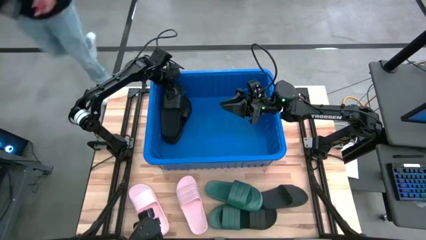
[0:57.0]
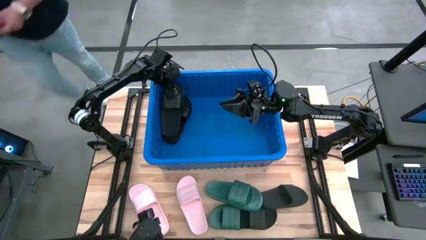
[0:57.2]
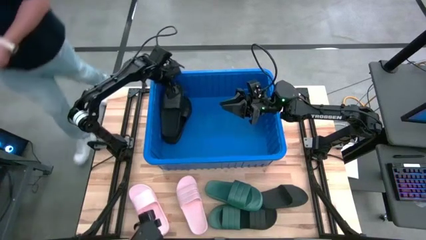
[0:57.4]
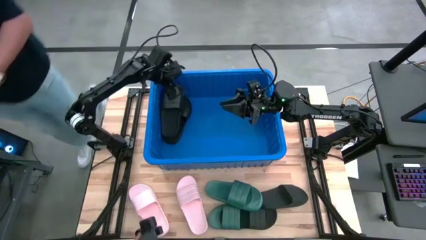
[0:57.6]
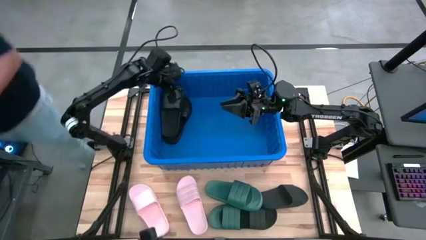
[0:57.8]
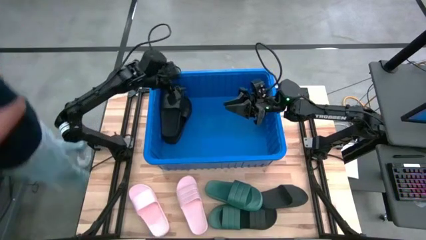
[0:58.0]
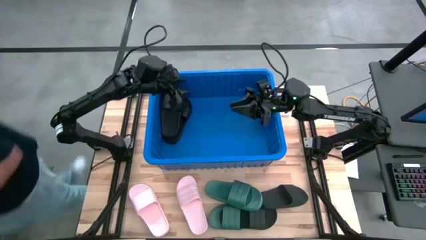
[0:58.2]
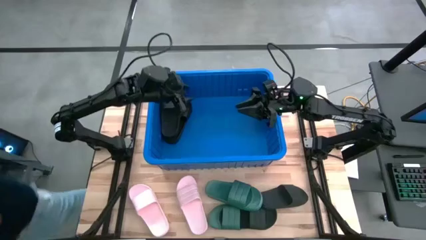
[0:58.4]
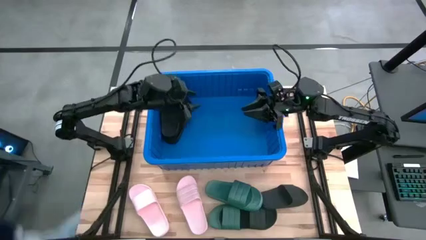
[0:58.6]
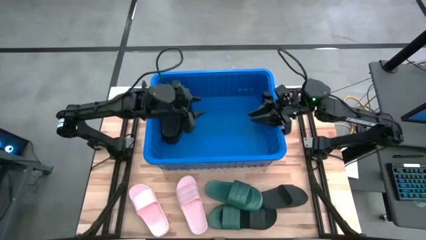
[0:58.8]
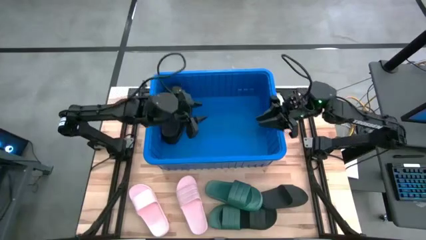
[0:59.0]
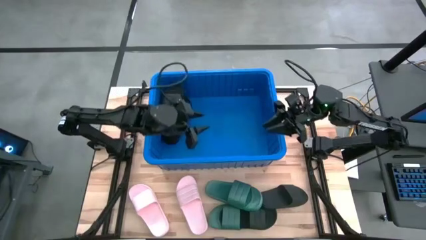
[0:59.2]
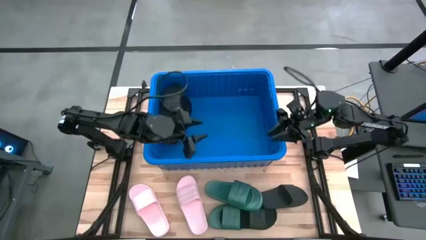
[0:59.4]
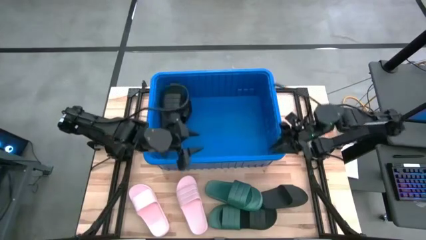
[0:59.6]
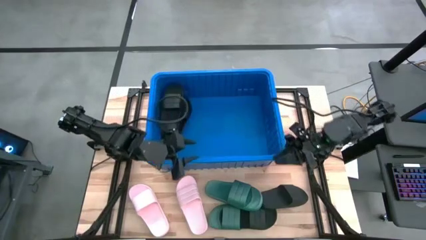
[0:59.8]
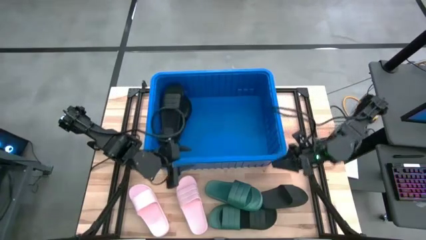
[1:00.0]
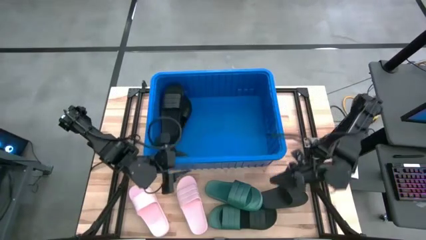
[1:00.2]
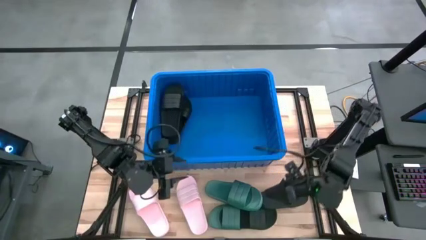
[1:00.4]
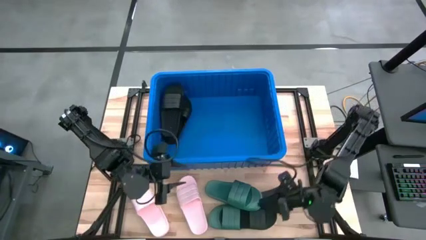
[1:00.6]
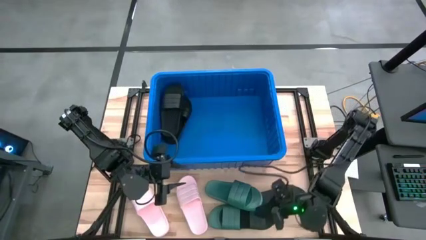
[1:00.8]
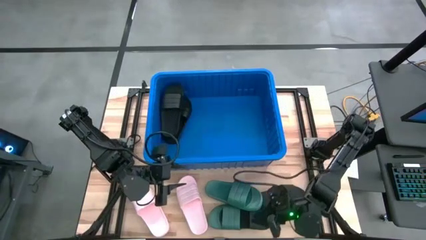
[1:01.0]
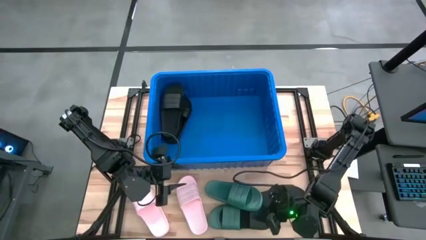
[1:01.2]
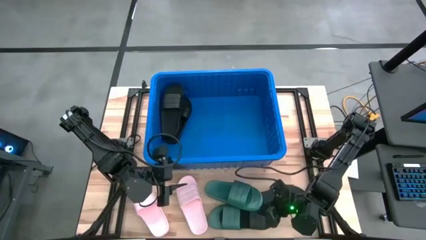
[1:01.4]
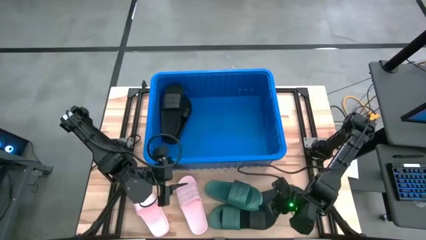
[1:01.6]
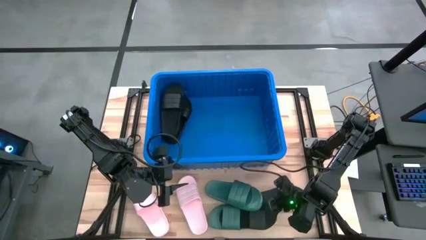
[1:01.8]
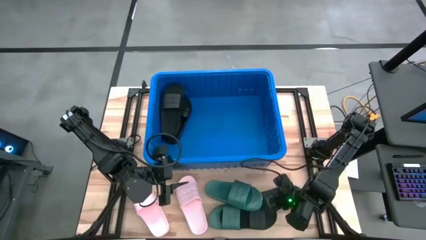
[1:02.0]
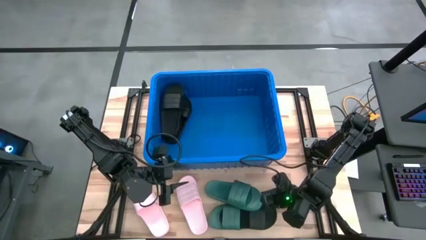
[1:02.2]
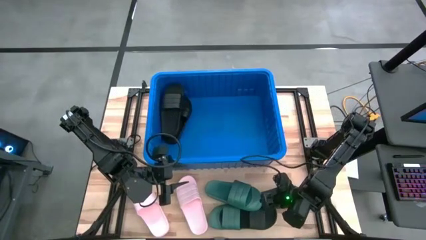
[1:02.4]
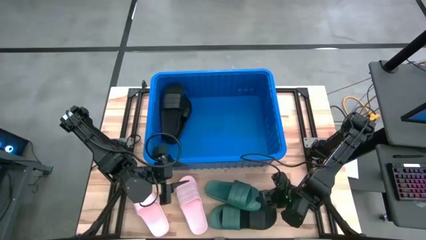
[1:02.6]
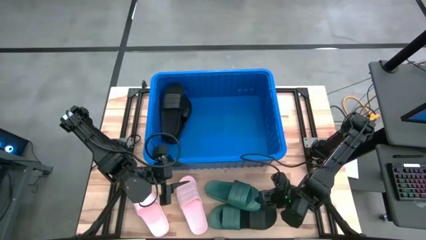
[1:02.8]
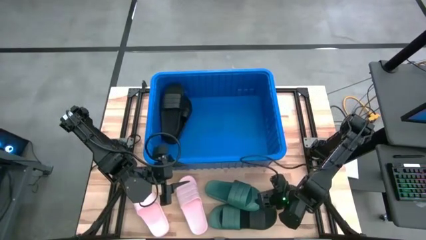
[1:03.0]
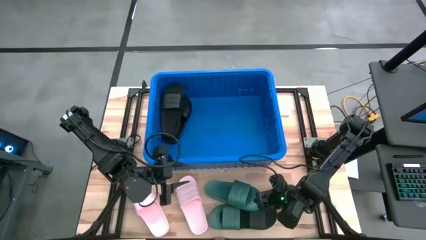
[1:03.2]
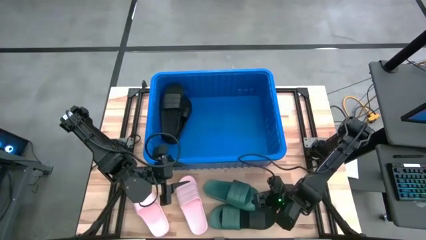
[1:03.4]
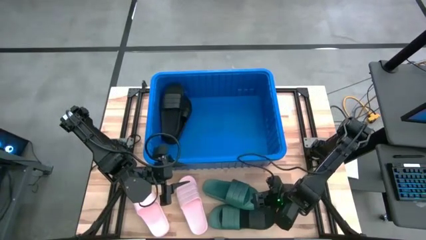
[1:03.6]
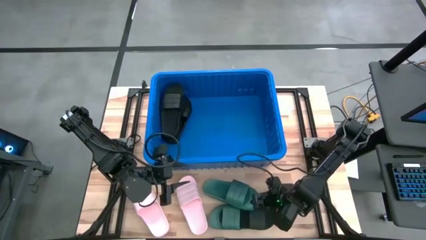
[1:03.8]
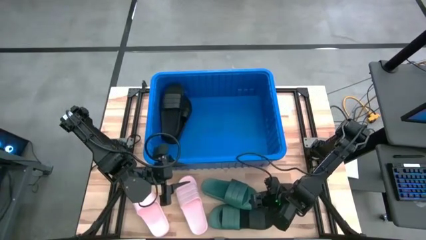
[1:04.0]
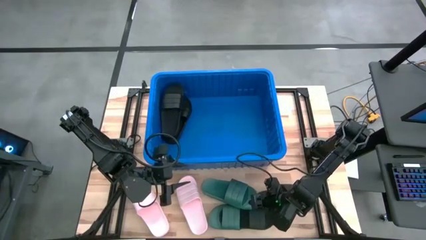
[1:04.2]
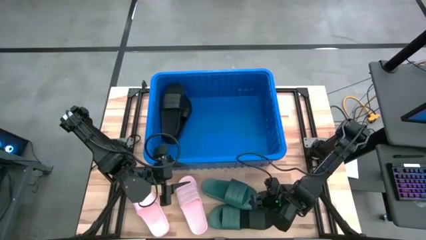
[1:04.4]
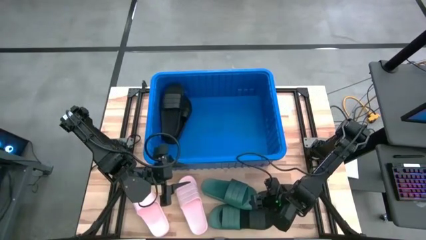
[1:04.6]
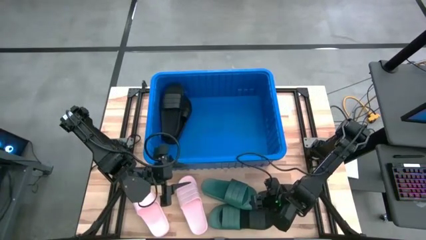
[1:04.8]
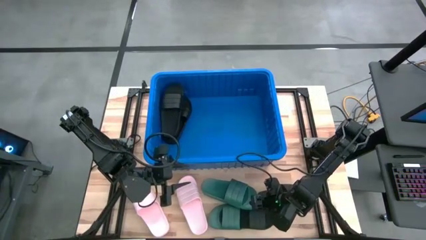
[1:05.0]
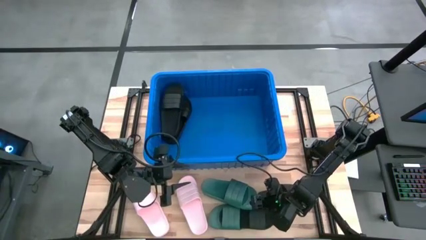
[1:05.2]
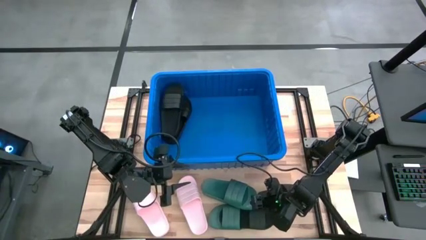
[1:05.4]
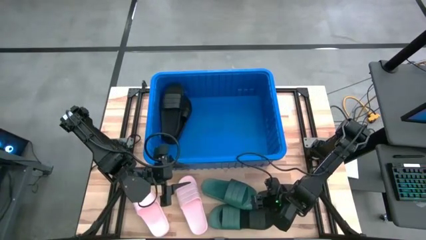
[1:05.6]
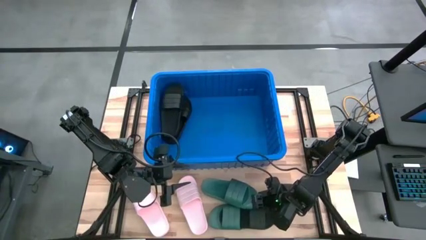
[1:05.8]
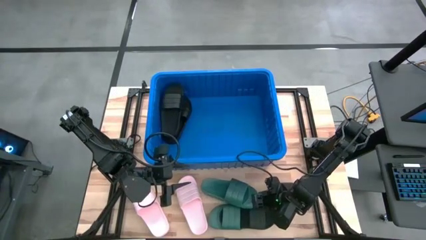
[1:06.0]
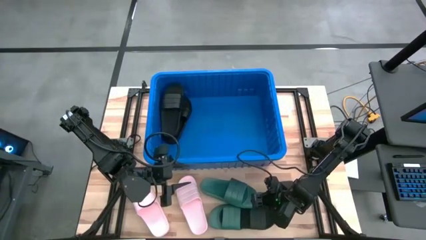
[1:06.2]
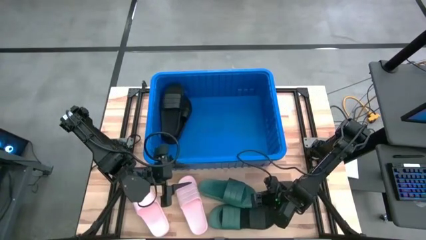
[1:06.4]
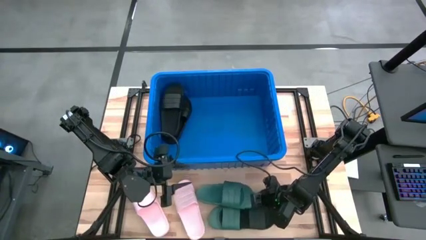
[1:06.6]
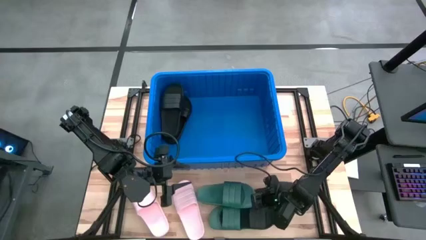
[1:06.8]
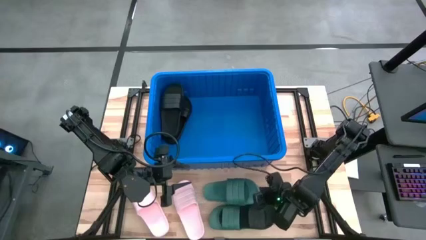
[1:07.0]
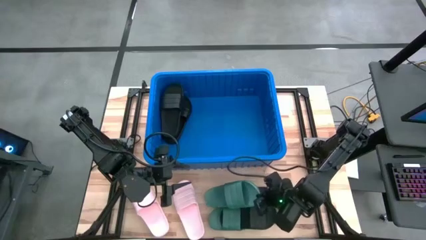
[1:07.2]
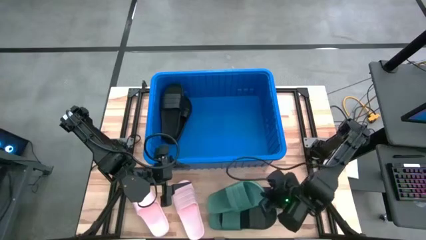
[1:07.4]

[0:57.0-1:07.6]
Task: Pick and place slides into bin
Put the green slipper into the blue bin

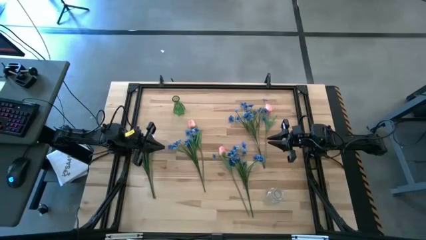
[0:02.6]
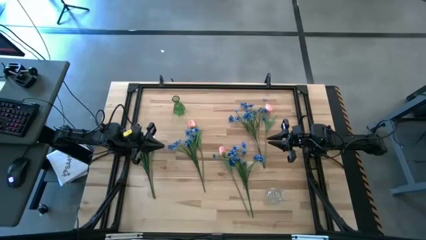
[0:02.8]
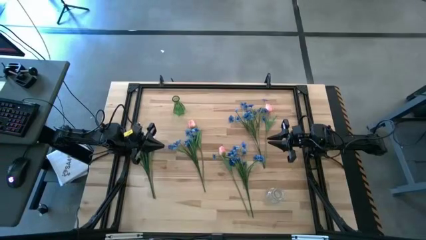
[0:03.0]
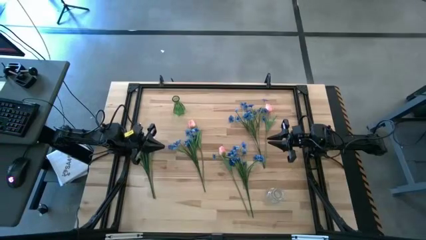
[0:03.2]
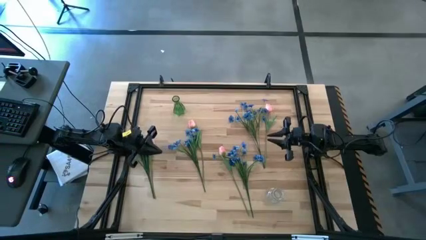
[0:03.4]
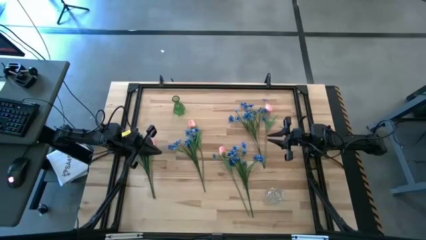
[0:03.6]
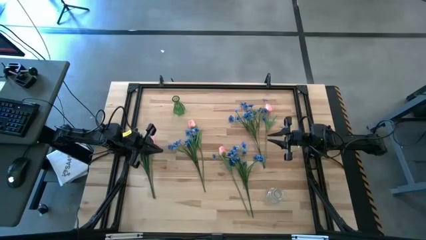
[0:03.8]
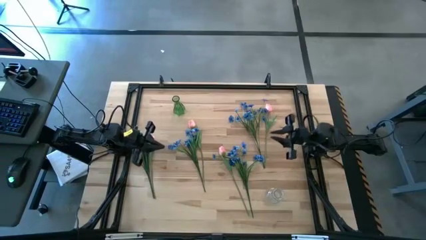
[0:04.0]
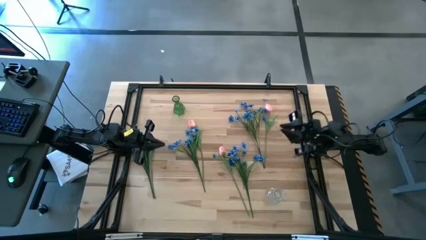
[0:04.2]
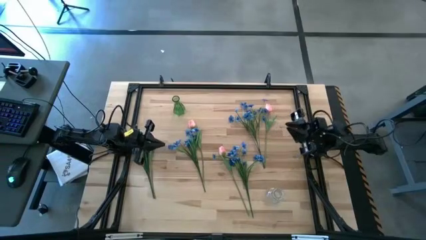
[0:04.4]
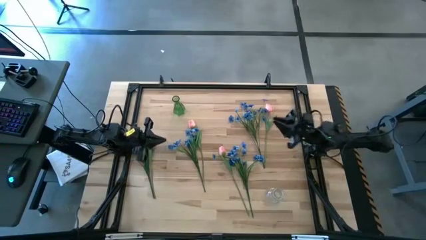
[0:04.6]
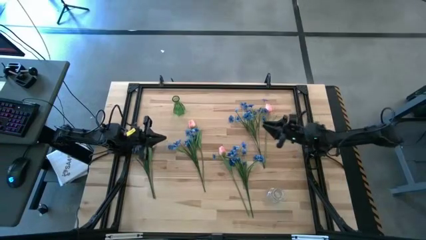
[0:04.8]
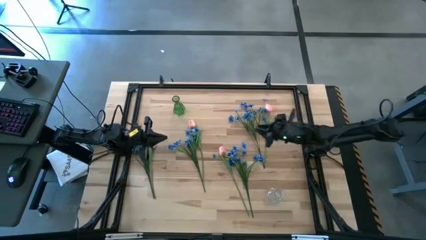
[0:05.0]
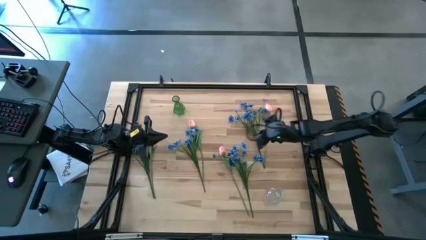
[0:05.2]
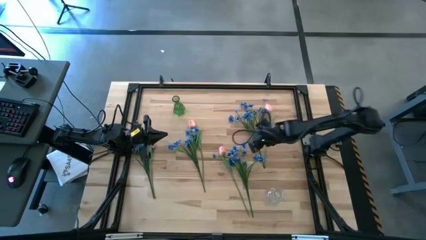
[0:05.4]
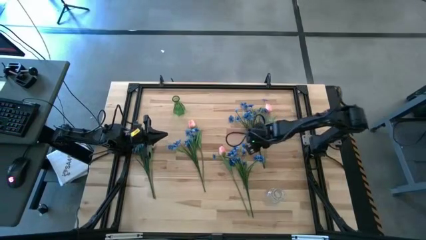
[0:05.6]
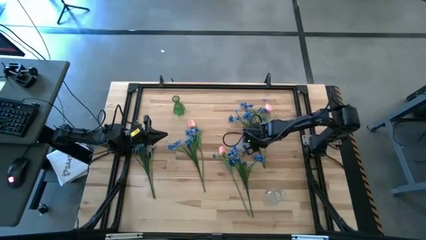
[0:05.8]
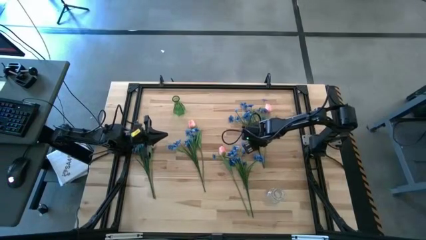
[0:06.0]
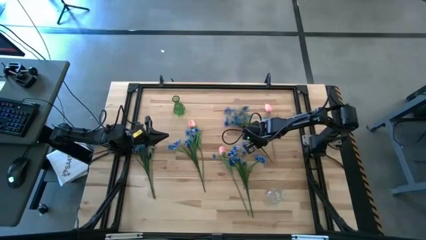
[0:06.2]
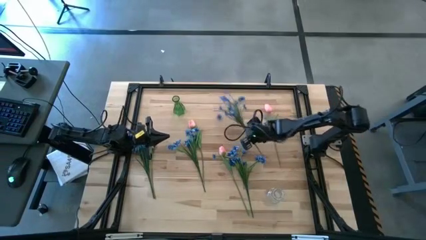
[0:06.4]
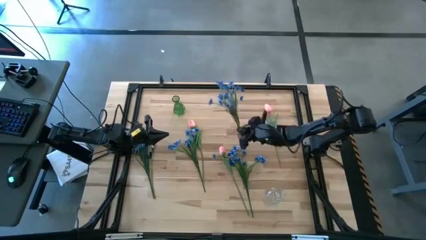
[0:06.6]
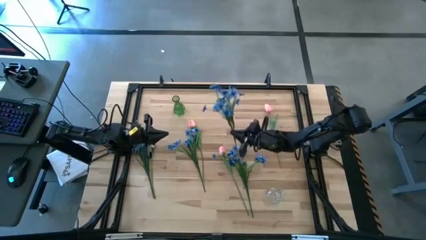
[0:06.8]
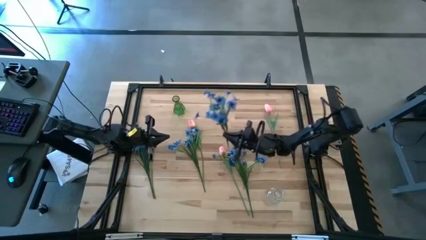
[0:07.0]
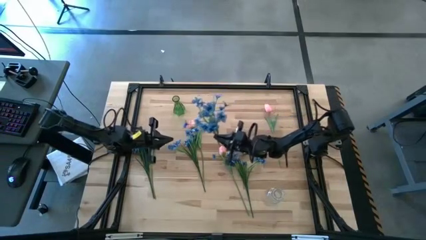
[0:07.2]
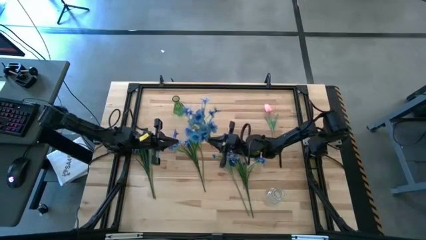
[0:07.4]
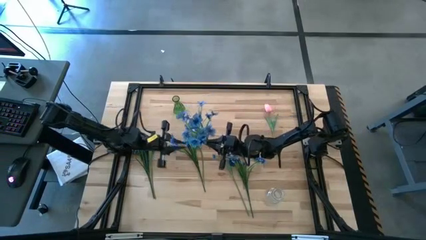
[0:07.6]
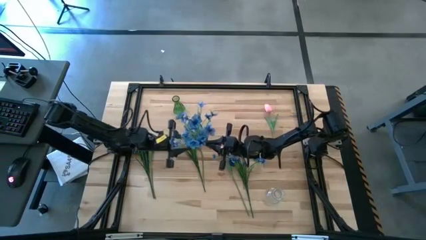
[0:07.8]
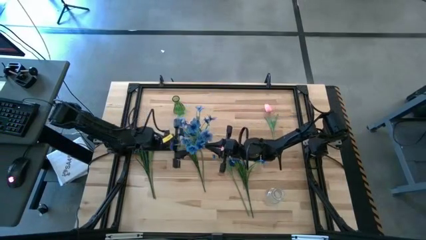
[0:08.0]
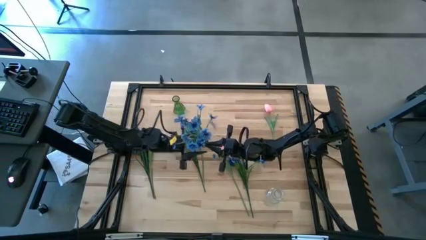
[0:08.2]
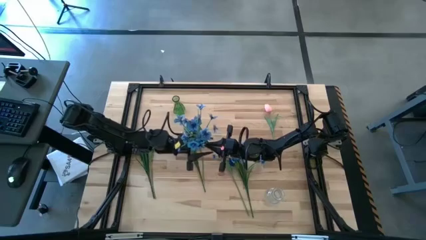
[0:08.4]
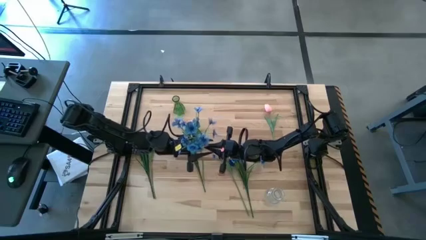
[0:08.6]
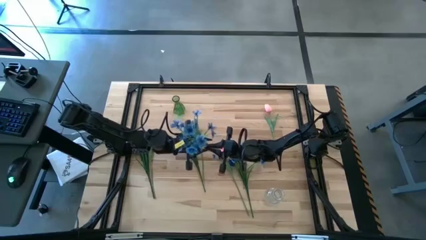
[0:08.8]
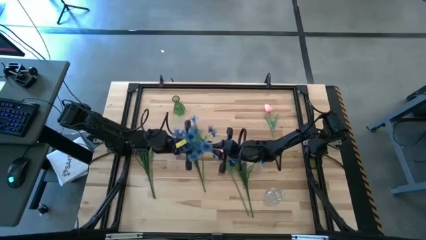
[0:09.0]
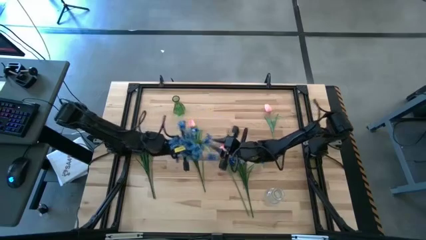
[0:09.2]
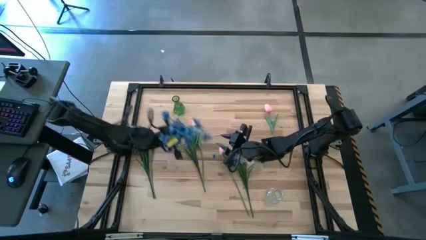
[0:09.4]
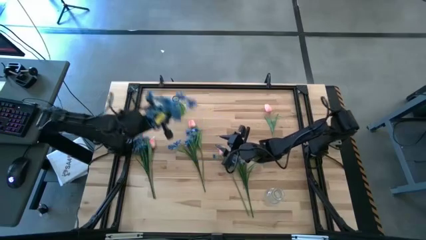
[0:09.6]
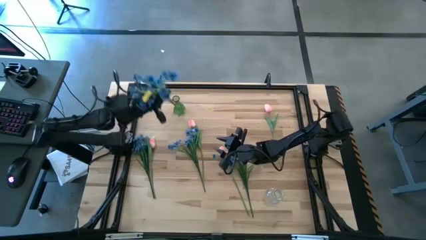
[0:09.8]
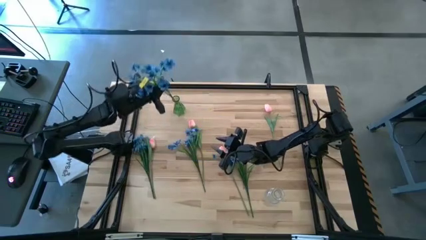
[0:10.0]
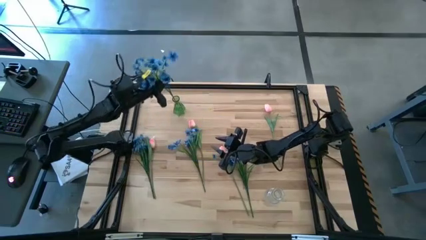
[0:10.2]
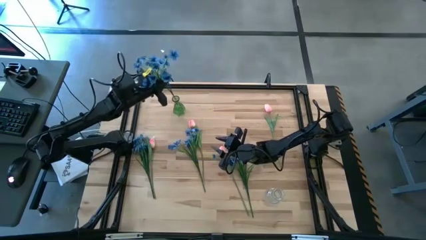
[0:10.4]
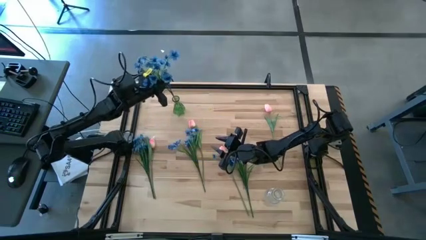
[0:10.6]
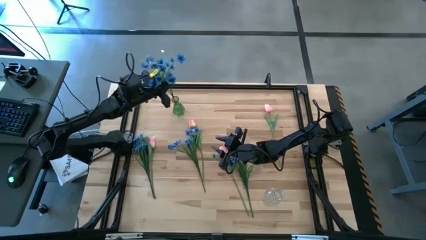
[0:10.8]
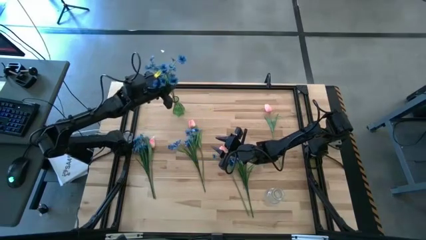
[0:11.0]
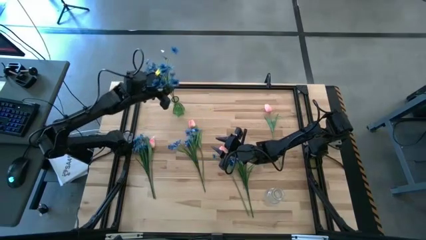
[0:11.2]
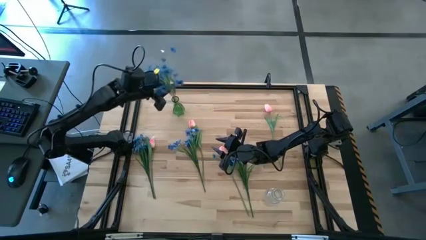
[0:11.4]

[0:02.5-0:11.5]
Task: Sort flowers into vase by color
Put the top blue flowers into the green vase
